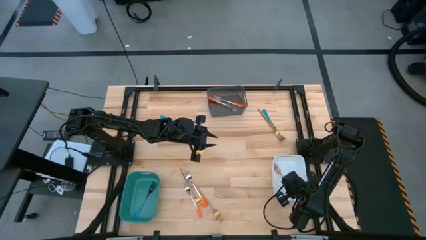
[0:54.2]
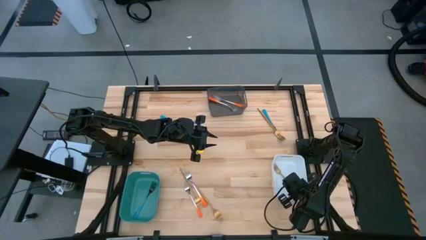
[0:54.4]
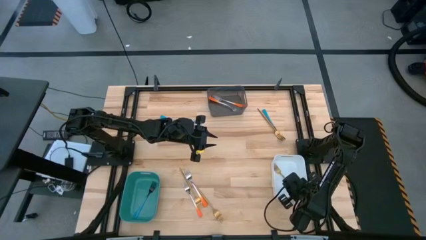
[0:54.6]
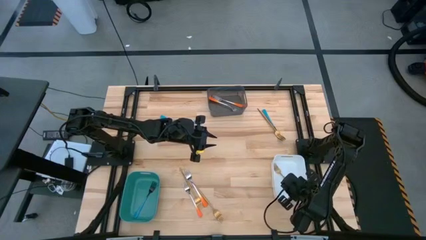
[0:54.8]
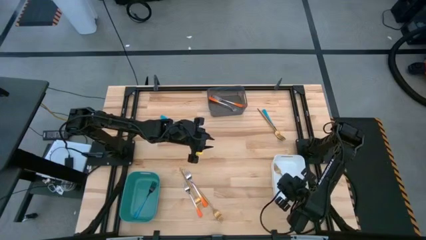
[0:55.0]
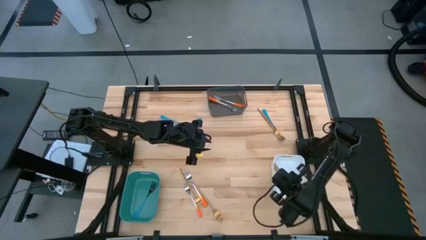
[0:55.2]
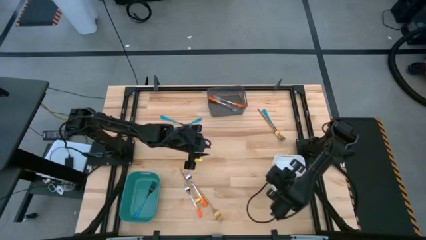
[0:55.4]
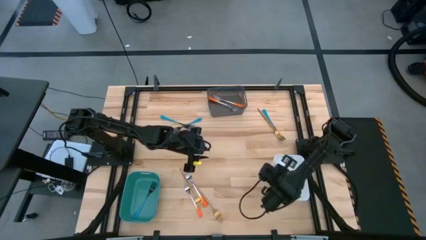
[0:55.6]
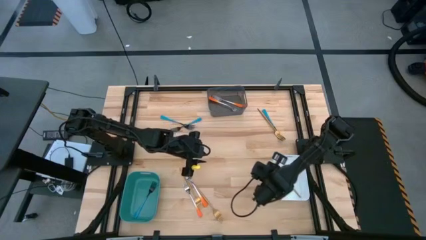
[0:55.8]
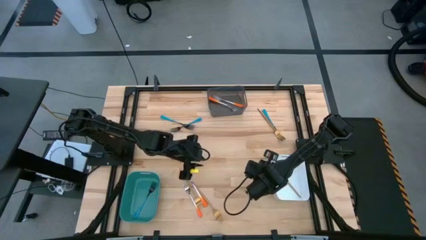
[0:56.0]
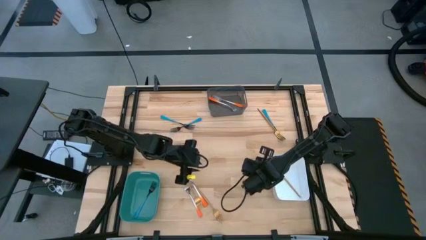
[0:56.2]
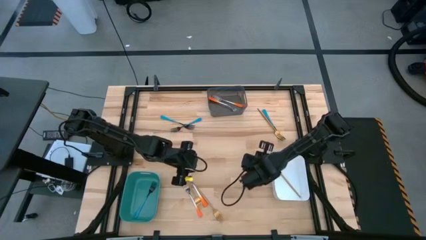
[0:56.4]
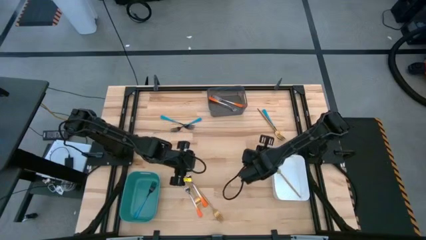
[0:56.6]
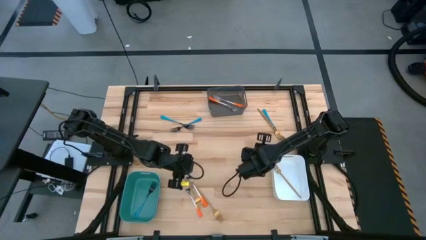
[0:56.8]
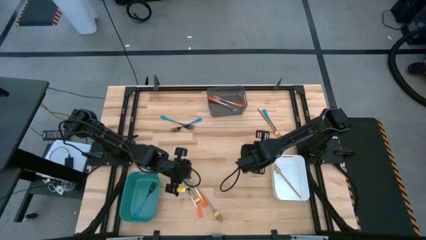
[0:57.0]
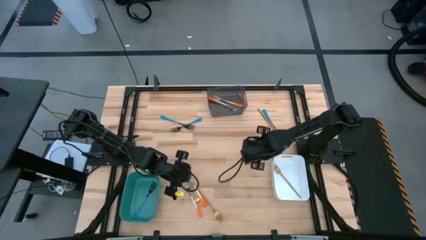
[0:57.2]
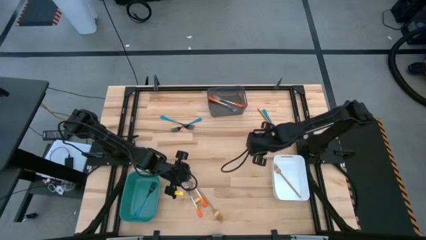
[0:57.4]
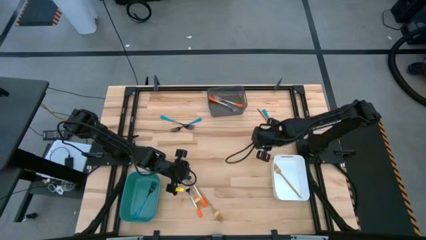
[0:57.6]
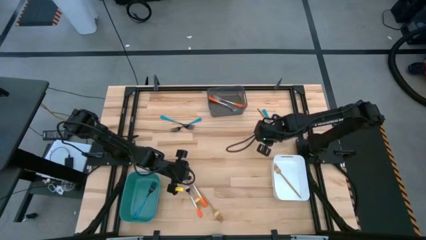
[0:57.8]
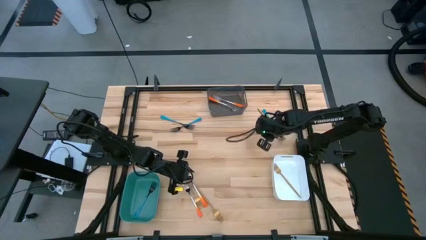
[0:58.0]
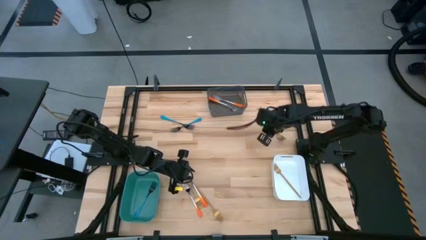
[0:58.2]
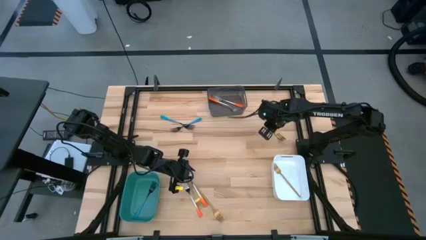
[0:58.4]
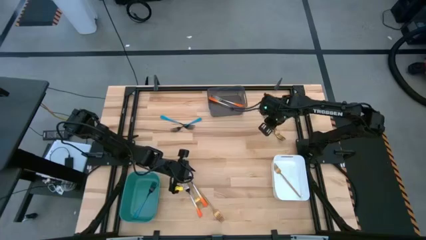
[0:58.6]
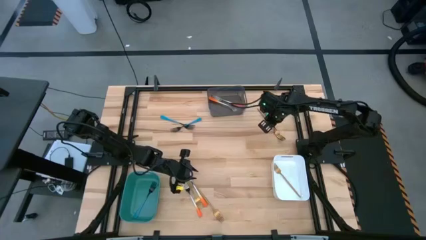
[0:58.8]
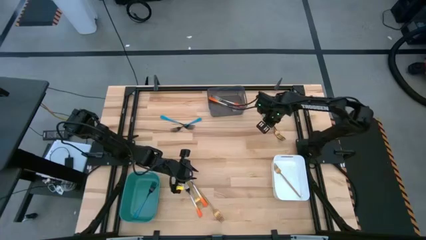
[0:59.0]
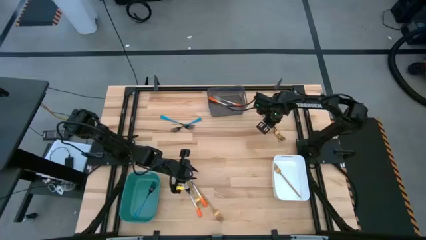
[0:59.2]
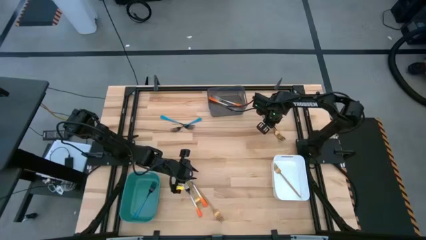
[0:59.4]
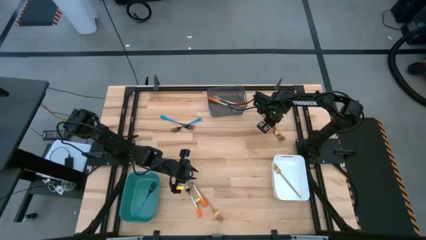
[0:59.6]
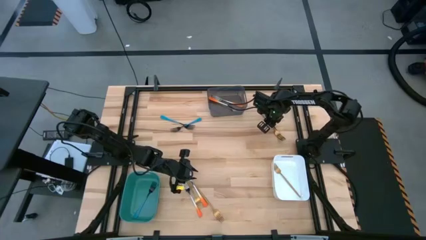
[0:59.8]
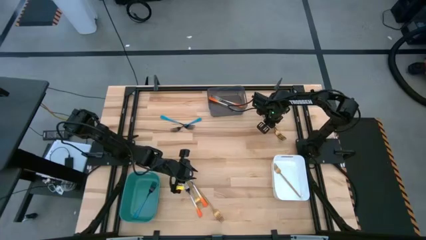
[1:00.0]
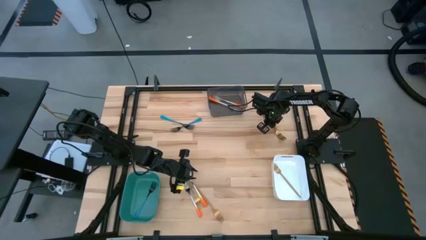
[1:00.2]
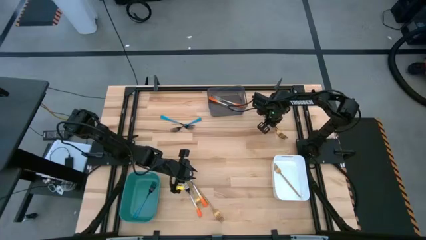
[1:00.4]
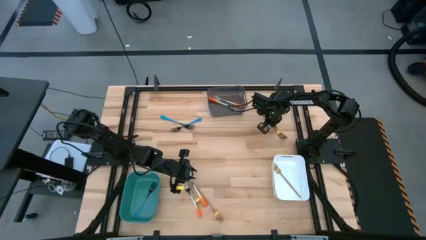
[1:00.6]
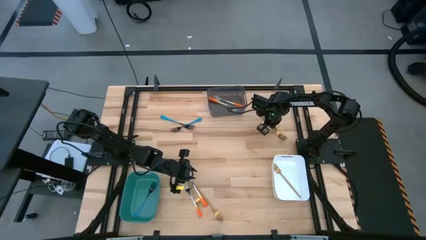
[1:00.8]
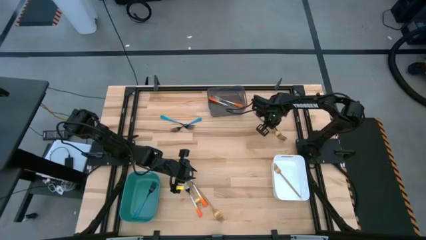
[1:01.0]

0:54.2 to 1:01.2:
Task: Sort silverware by color (type)
Put the gold fork into the white bin

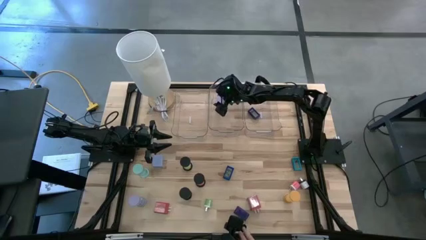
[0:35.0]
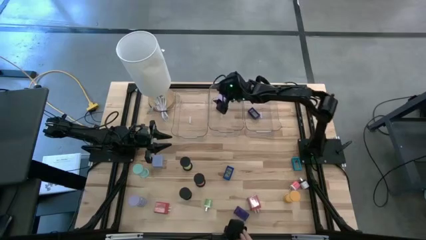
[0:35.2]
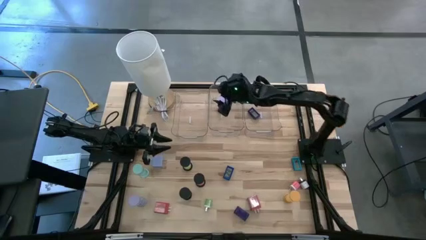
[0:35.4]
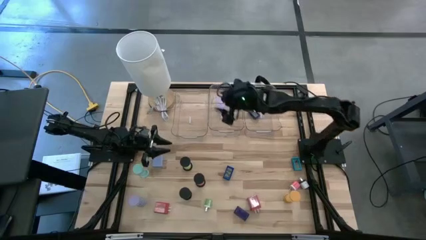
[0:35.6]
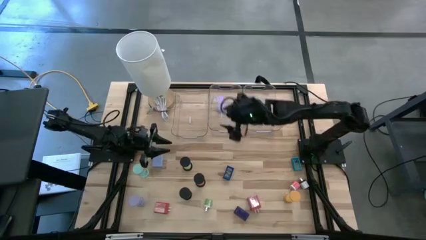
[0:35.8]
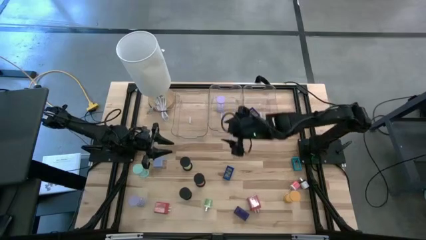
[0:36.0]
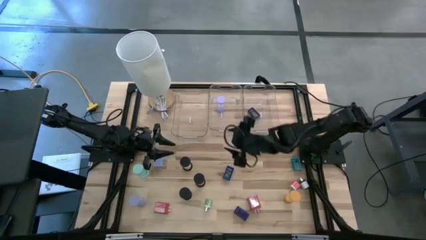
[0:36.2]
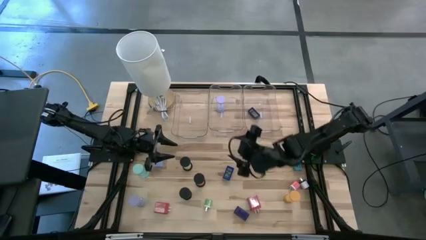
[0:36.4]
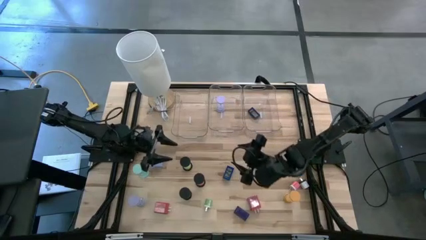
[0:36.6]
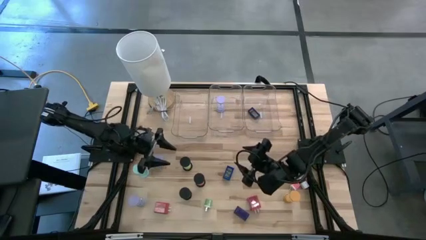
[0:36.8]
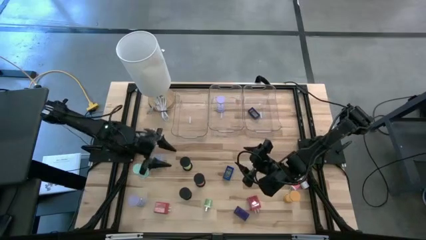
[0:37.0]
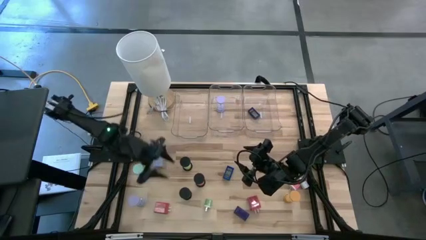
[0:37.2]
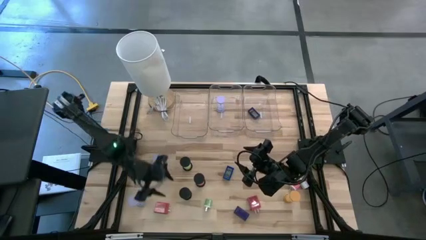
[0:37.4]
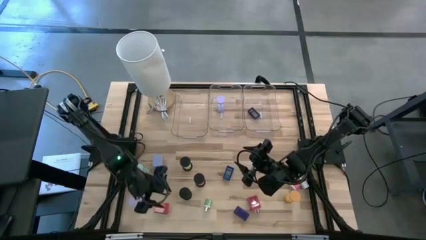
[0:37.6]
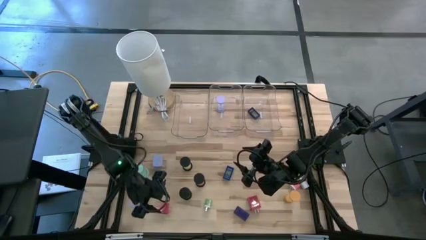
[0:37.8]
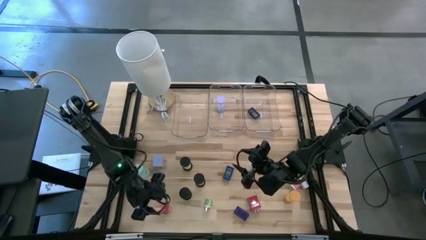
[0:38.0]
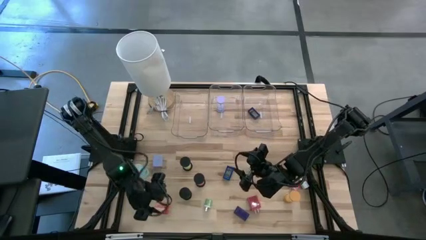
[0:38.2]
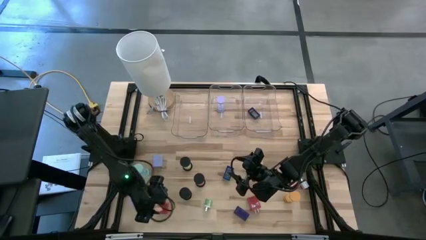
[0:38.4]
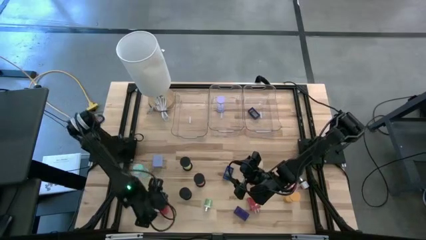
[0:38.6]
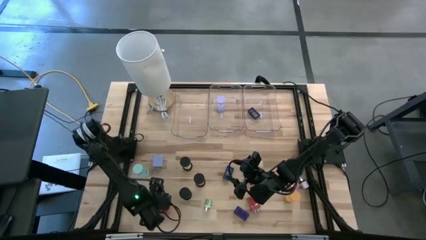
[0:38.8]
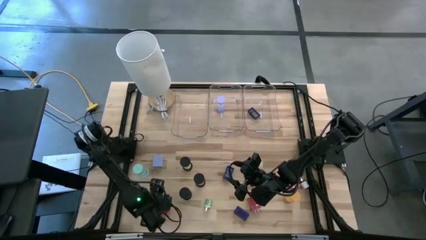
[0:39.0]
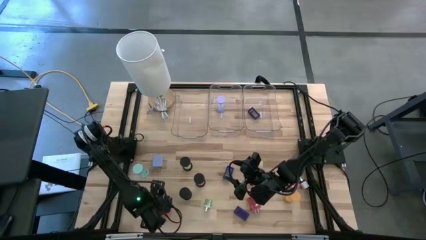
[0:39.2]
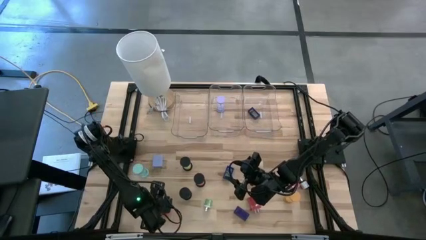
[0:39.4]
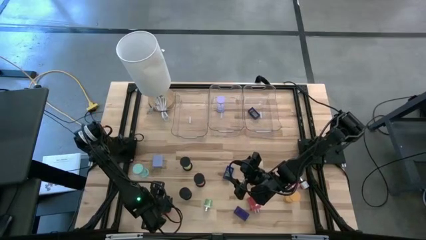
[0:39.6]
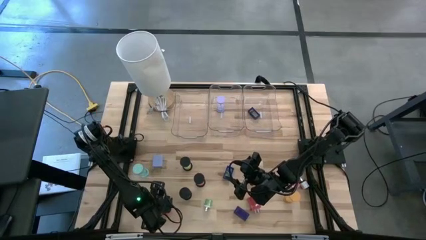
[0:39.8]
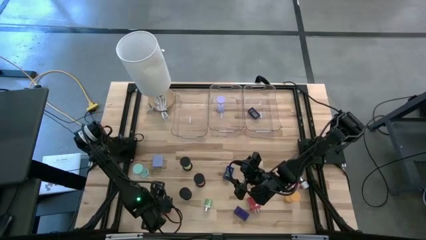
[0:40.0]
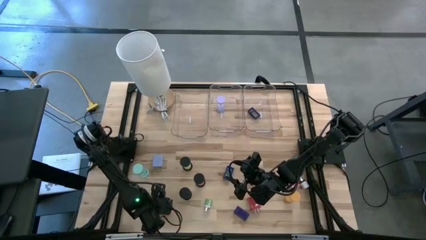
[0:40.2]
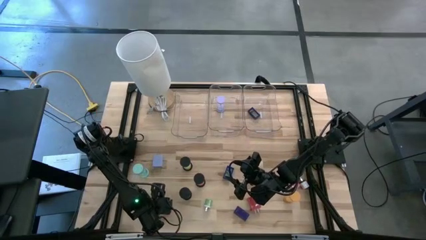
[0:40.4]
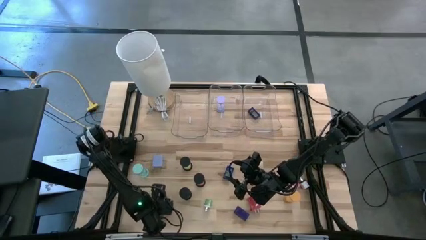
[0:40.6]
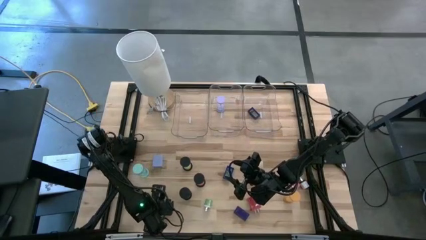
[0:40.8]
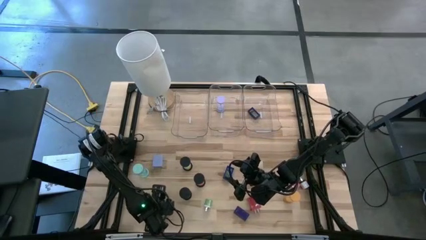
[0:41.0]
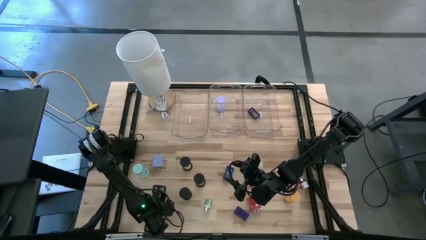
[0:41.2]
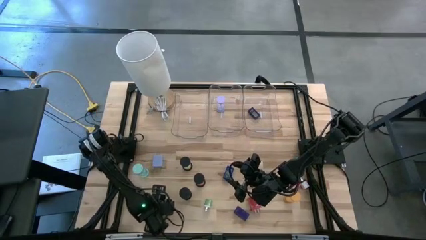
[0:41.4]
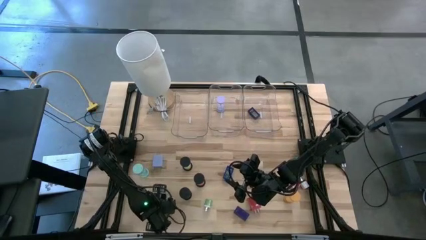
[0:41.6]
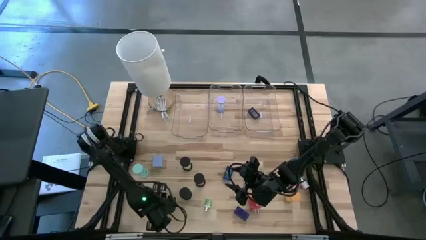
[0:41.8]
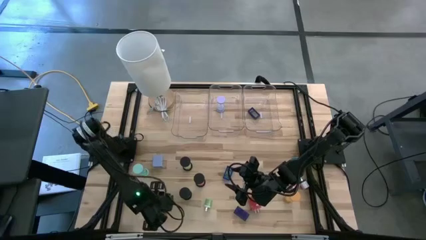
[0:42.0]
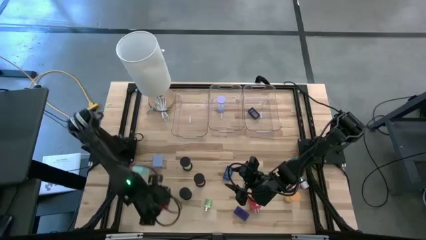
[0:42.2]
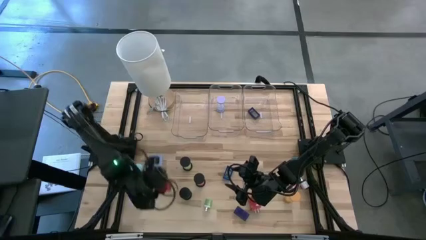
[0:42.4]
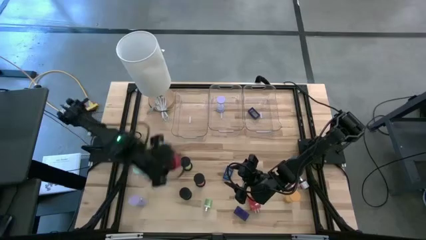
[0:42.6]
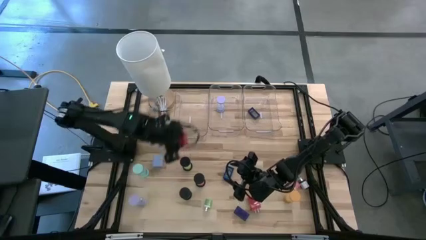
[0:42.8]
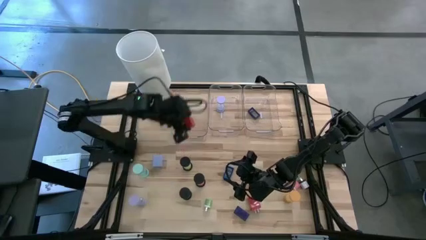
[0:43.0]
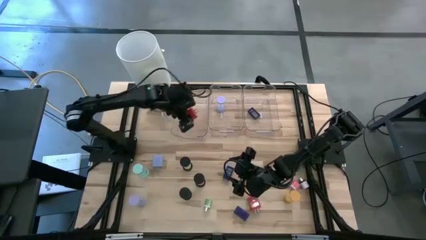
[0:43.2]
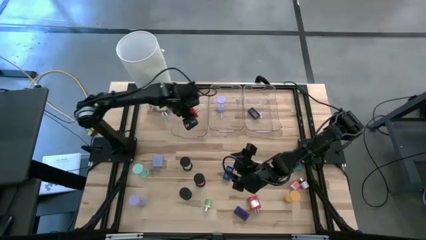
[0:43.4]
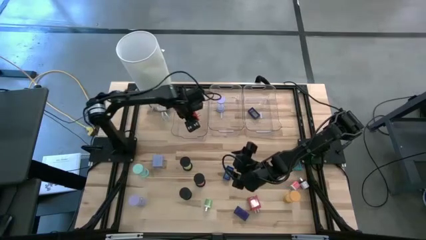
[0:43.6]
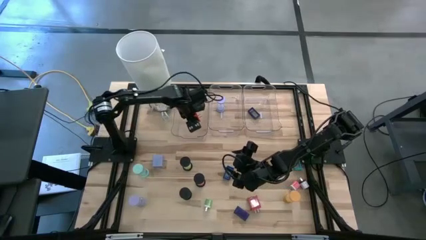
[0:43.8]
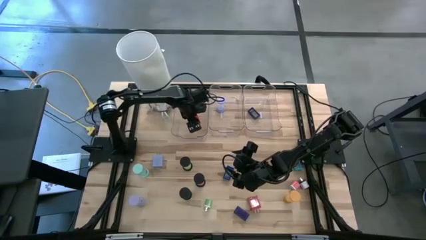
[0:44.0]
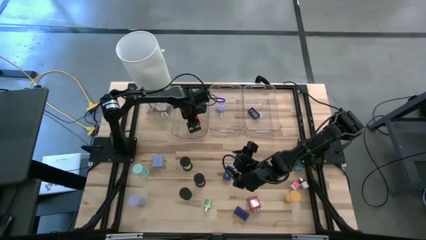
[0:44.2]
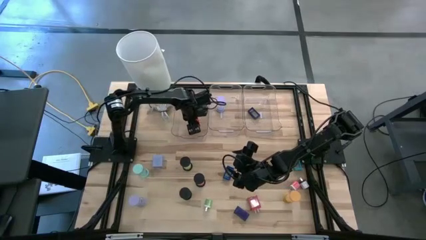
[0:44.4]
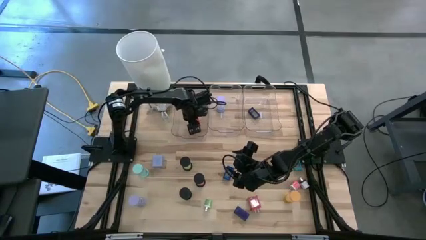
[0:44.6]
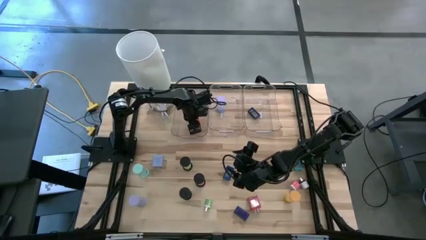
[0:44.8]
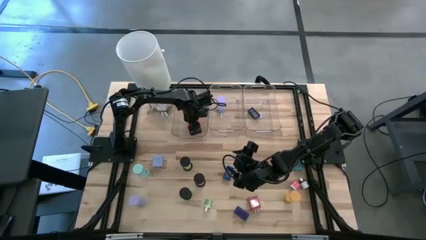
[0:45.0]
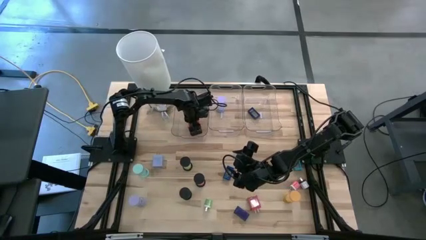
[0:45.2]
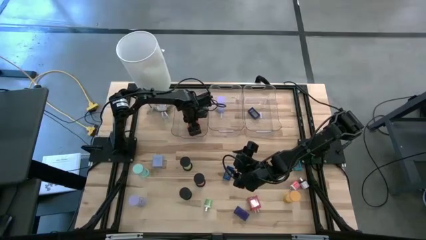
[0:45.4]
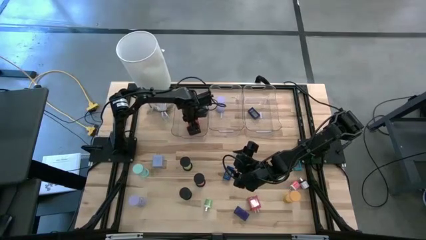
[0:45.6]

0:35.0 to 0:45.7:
Task: Pick & Place Office items
Put the left red charger adapter into the left transparent bin
